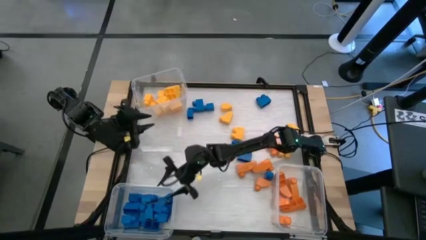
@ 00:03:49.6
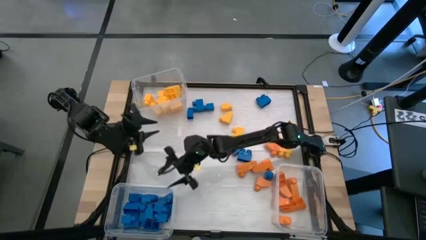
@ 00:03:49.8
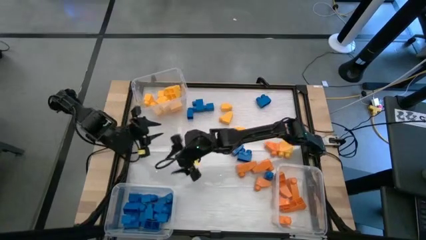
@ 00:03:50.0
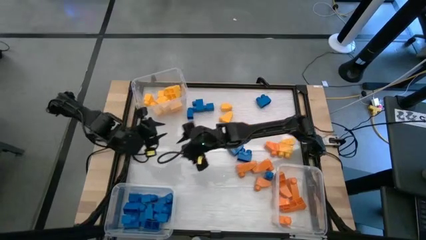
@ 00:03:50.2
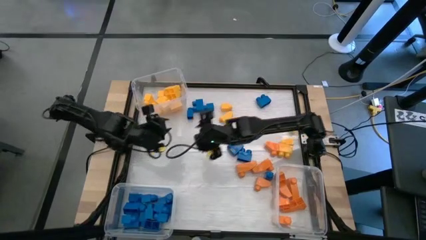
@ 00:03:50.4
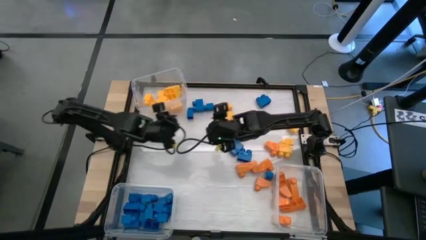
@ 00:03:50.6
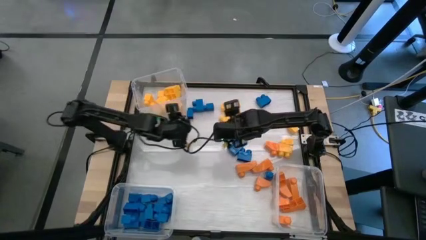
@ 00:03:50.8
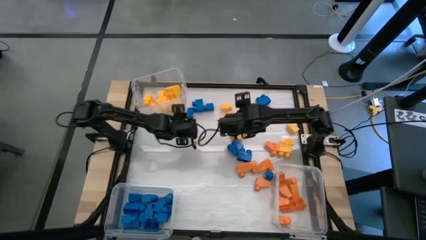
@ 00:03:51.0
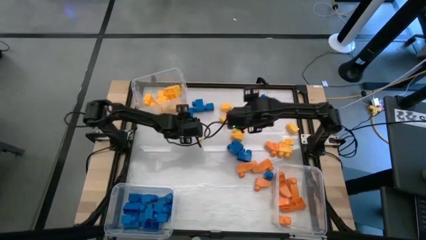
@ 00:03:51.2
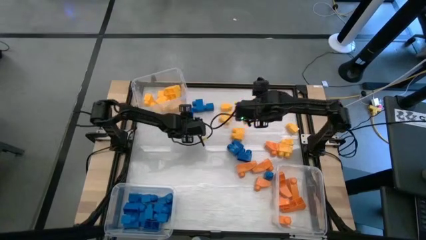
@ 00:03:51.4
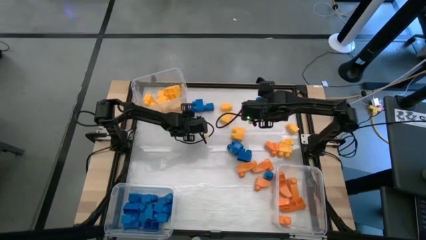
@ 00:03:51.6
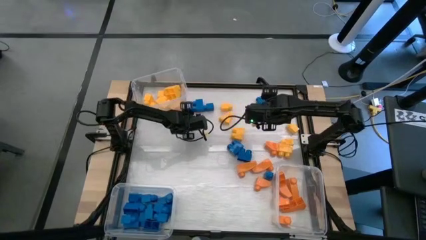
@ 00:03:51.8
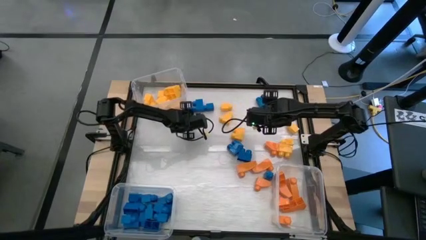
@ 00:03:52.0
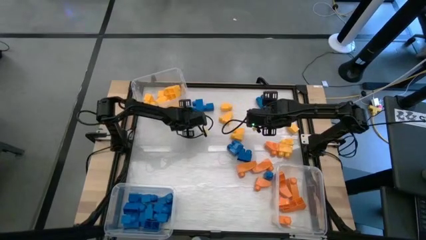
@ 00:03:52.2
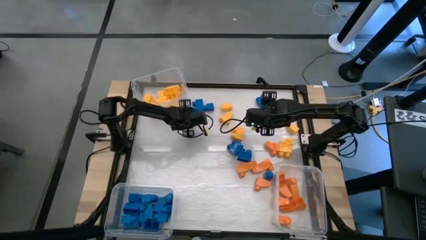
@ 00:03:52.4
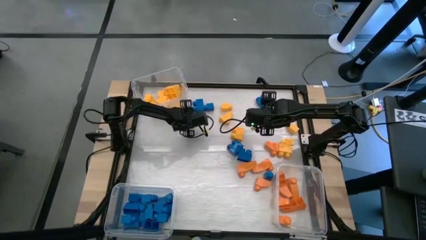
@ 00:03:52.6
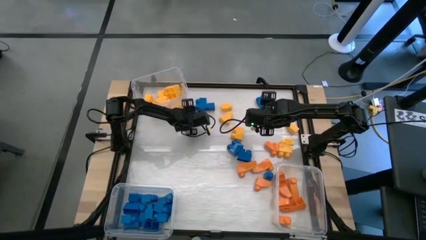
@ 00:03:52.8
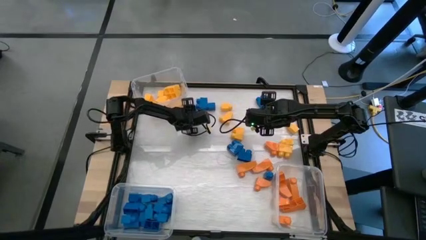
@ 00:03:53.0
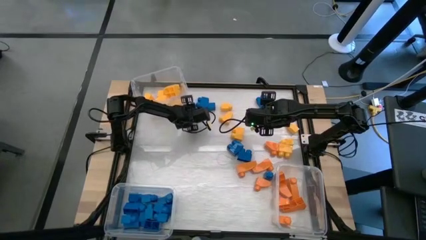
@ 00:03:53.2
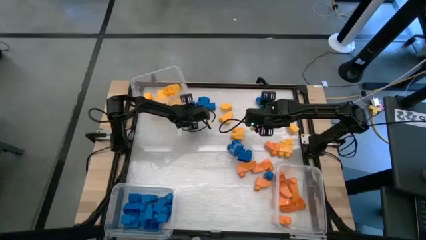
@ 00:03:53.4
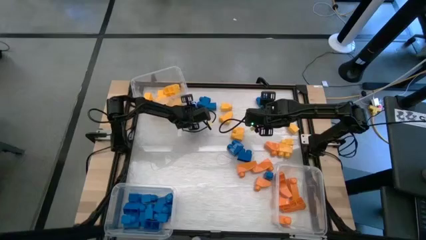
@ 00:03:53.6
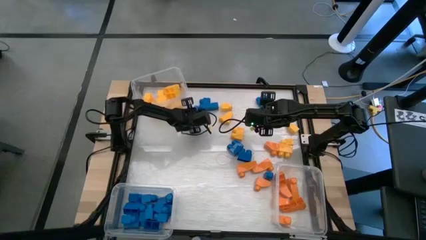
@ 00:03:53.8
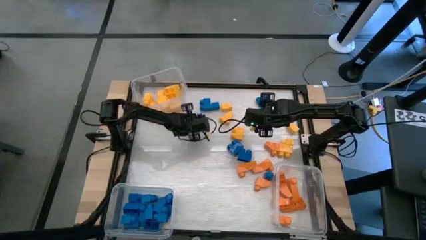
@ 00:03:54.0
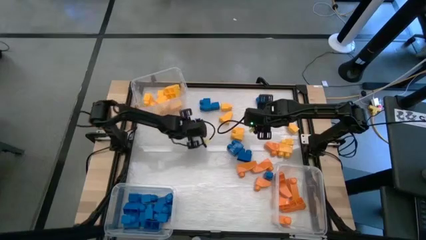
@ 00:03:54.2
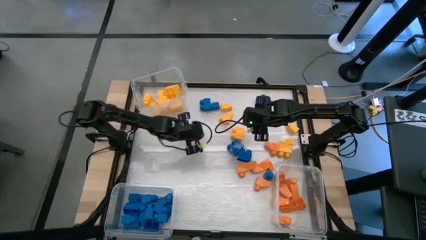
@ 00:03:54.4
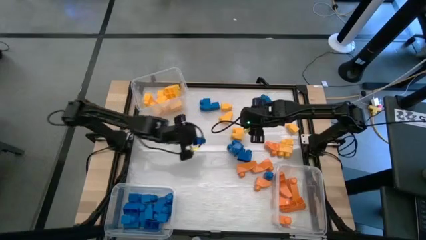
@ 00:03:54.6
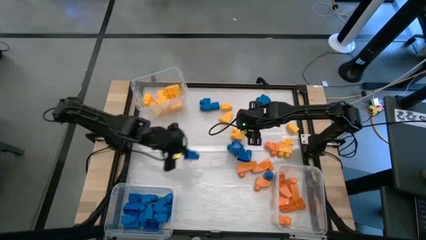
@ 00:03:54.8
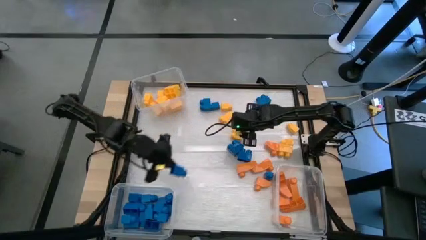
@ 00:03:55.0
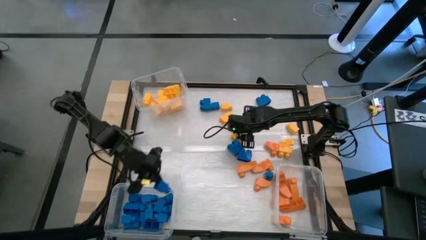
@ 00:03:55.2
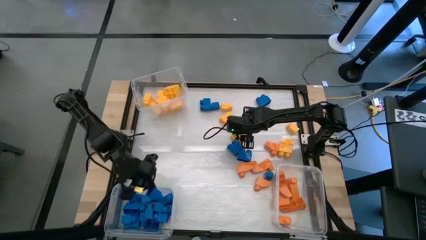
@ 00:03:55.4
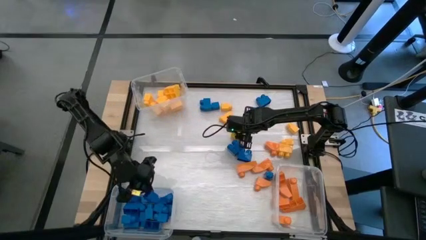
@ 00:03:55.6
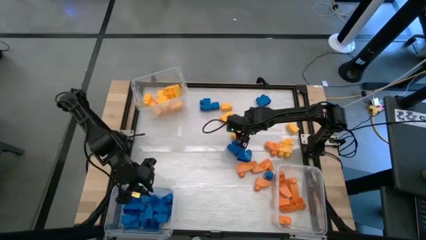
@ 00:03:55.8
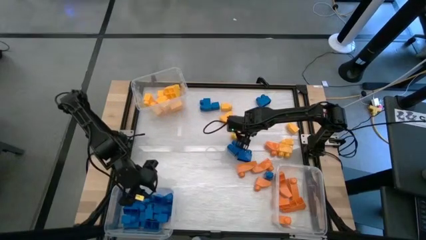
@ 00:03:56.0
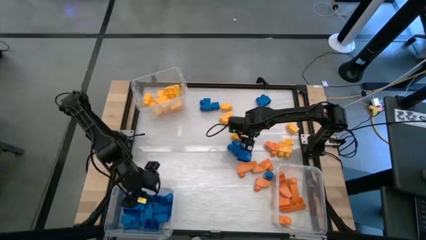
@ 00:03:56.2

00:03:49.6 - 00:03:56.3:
Task: Sort blocks
Put the blue game piece into the bottom left transparent bin

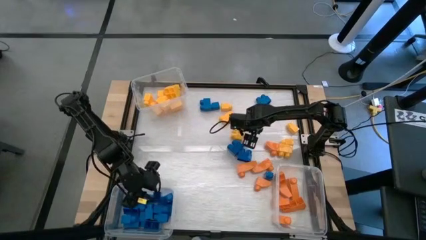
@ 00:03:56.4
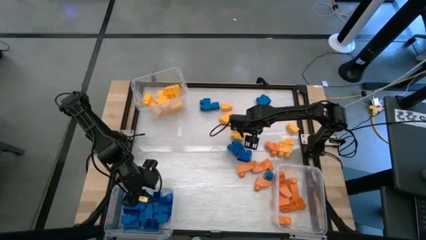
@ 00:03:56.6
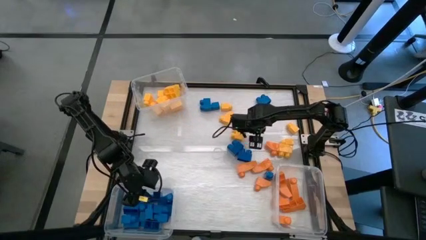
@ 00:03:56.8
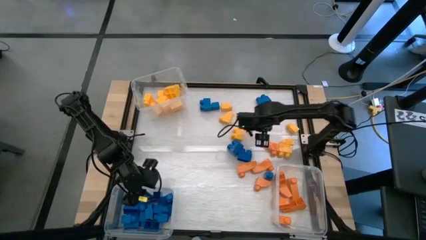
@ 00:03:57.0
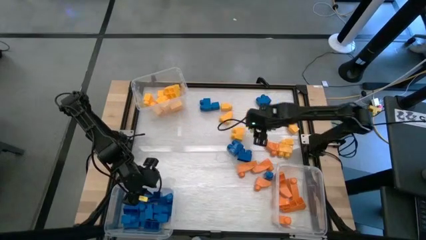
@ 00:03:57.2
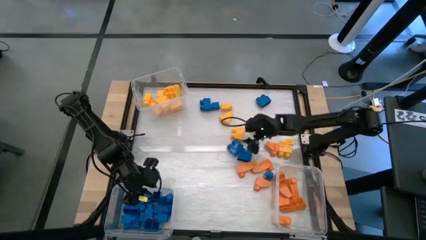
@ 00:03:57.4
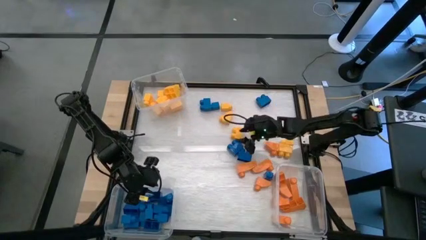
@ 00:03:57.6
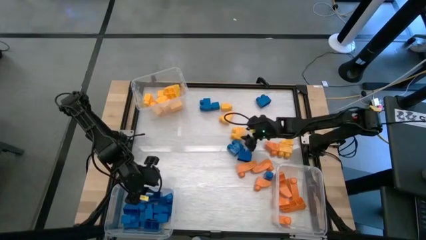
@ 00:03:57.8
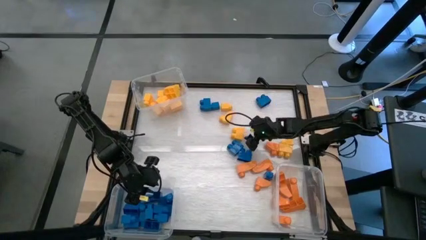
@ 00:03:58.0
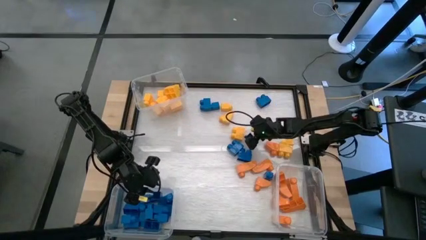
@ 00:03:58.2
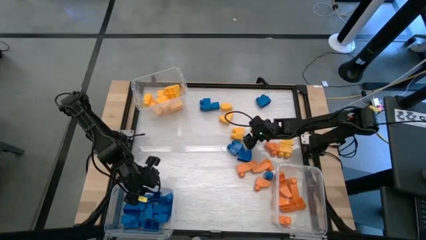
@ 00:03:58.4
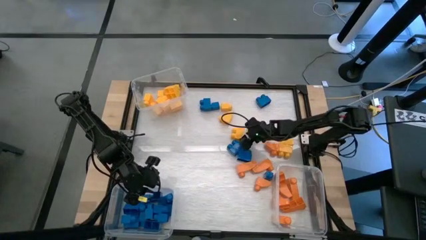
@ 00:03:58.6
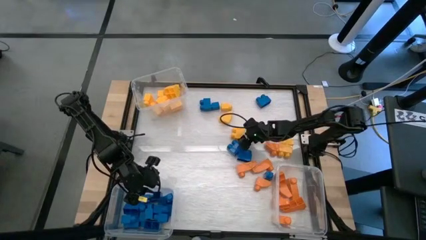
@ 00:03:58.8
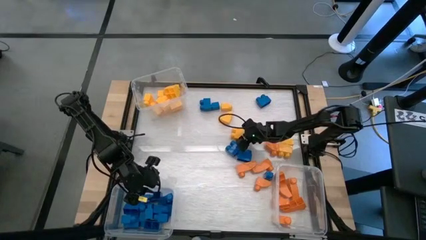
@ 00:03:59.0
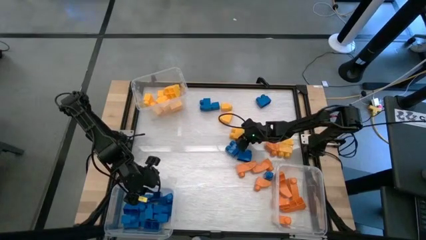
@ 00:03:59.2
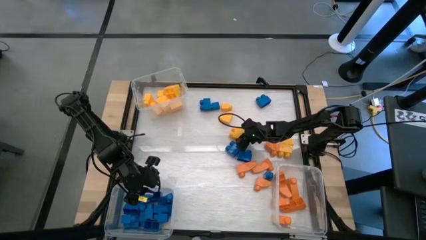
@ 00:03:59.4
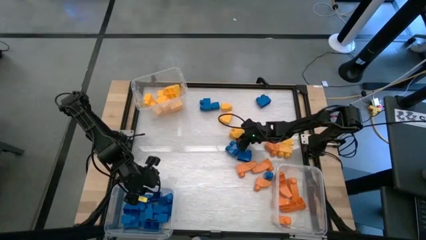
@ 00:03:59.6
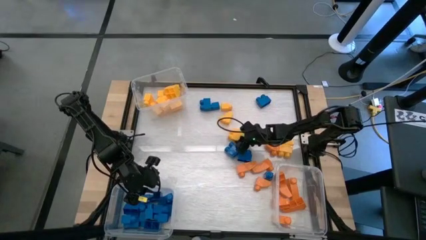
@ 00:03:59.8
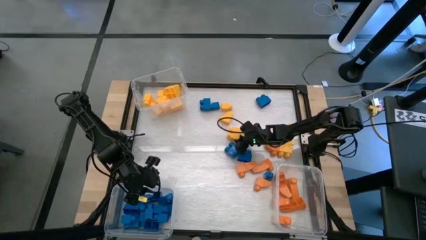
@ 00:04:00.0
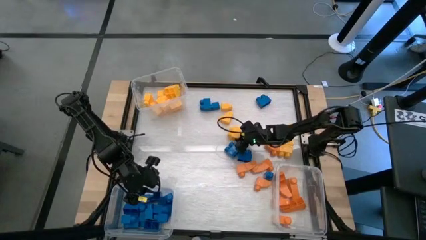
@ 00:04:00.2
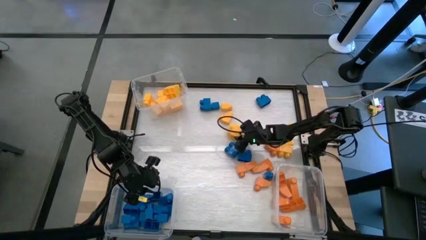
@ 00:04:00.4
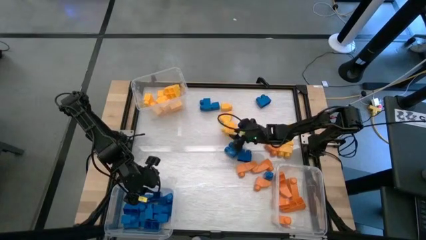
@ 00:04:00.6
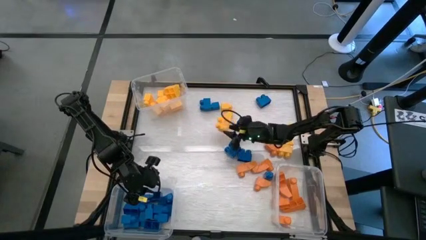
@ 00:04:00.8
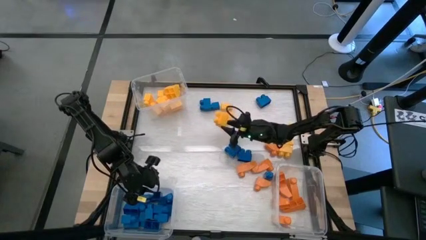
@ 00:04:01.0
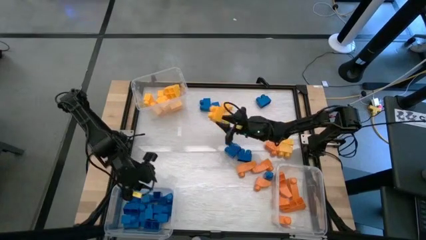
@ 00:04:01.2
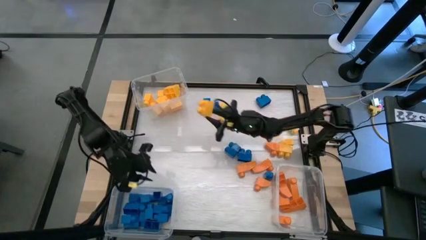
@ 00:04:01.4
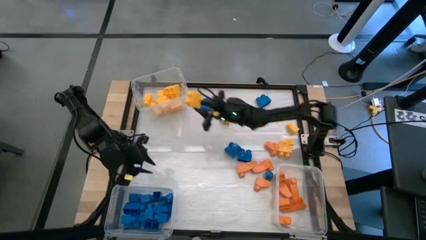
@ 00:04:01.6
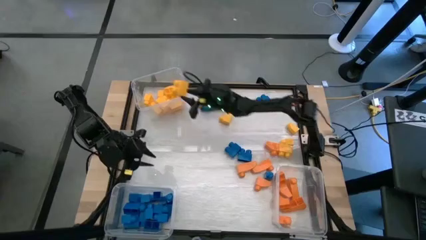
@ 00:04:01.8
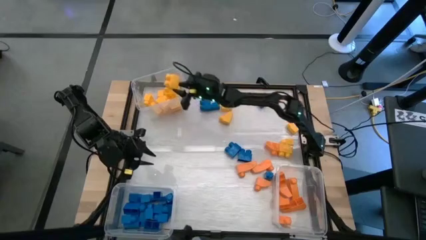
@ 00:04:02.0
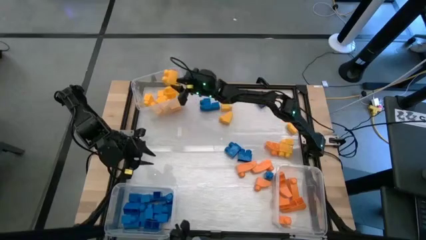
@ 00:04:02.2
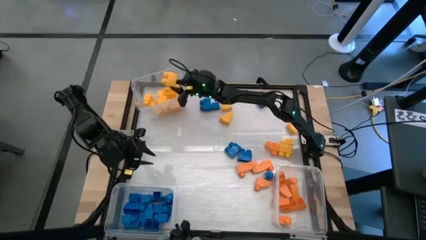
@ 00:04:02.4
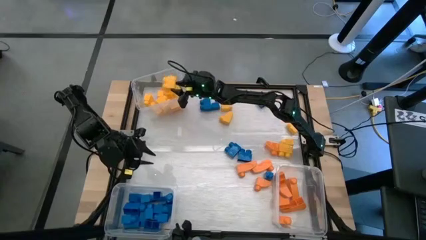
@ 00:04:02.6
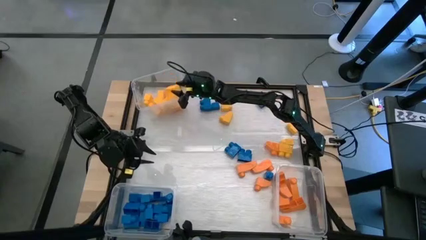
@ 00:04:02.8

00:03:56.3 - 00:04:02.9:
Put the yellow game piece into the top transparent bin

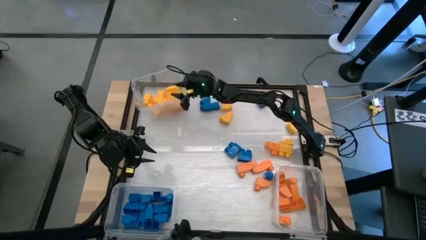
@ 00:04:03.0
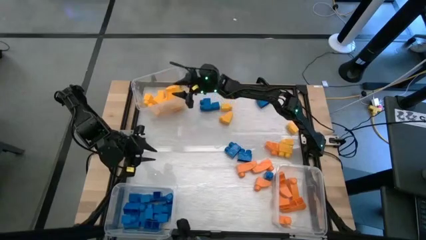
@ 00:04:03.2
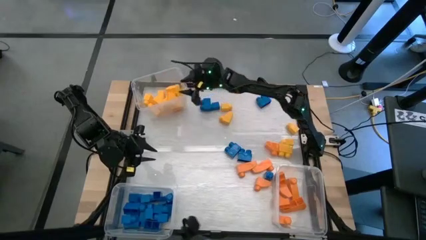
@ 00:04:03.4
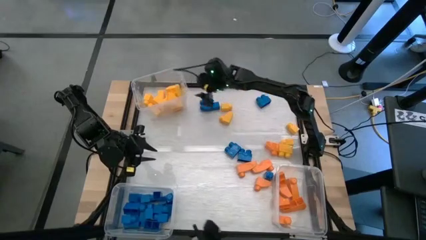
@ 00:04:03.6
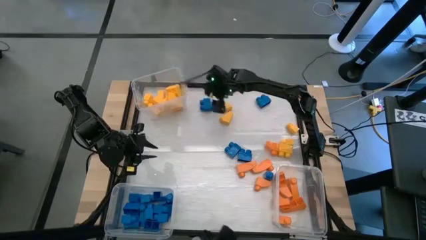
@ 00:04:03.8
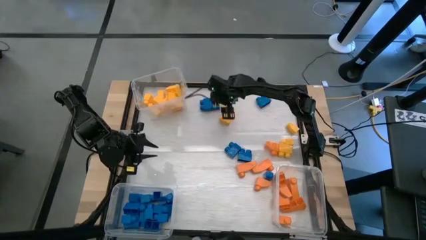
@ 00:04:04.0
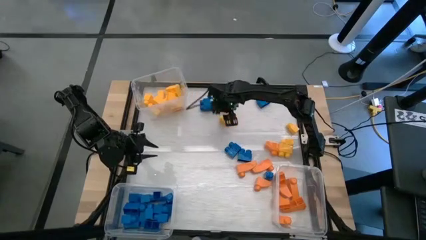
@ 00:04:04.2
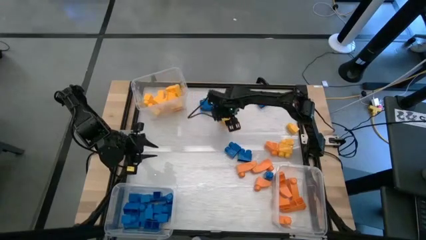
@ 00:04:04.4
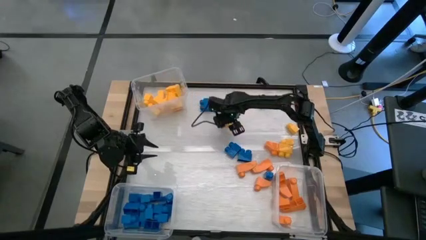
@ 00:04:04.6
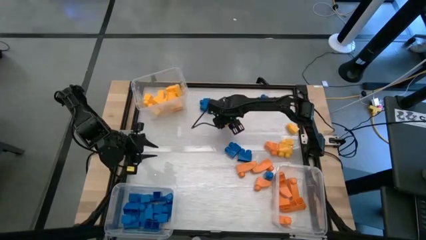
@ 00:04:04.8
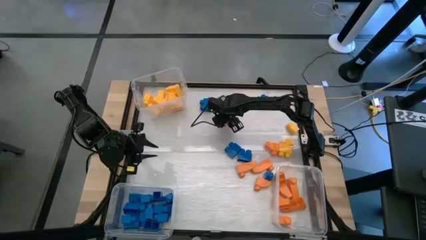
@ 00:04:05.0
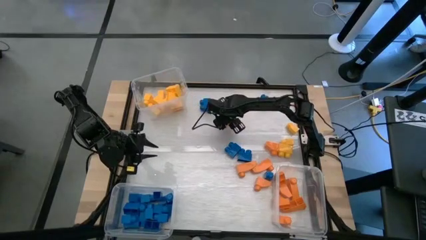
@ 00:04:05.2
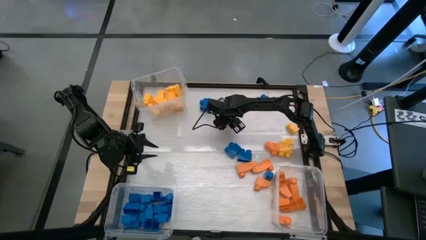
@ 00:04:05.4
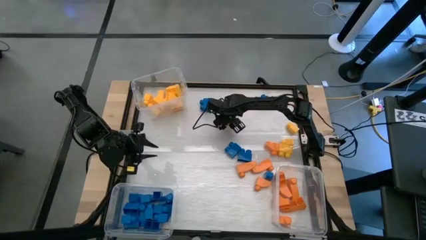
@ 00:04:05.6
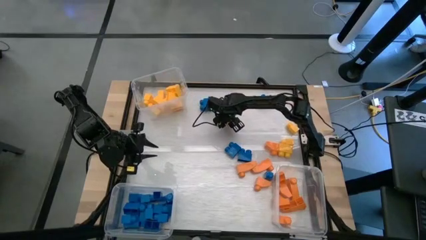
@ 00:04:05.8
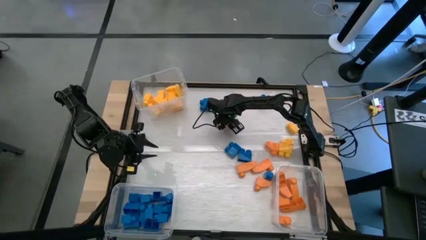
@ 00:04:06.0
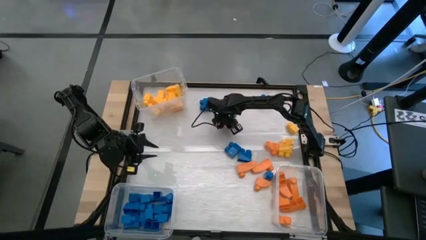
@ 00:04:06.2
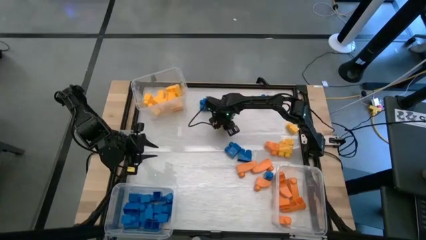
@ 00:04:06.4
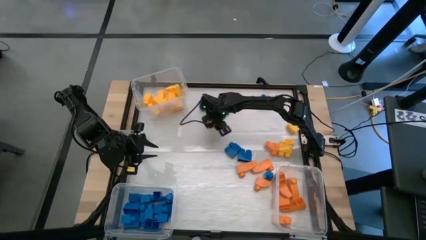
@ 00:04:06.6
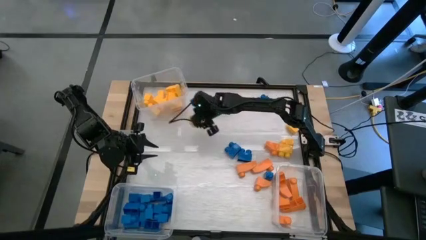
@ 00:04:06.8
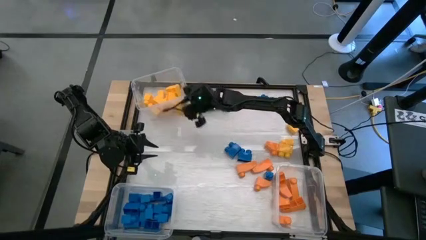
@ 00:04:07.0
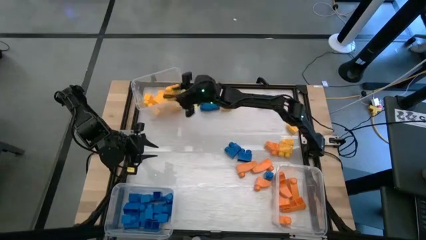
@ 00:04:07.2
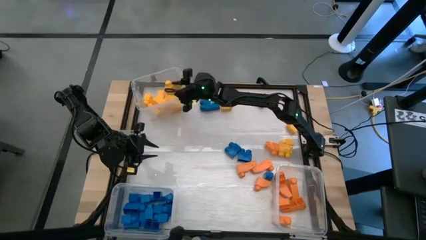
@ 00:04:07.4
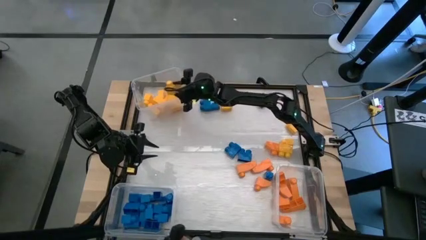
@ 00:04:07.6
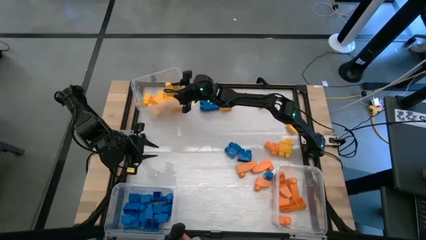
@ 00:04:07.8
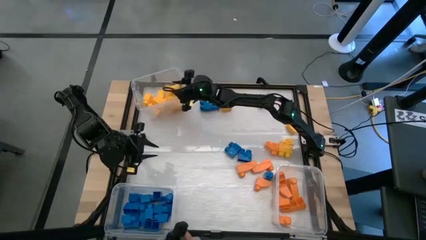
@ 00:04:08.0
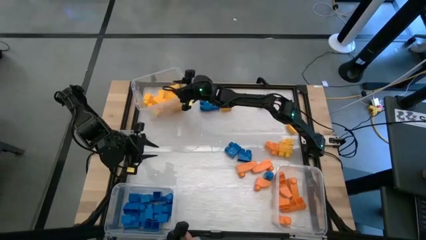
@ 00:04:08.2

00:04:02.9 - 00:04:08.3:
Put the yellow game piece into the top transparent bin
